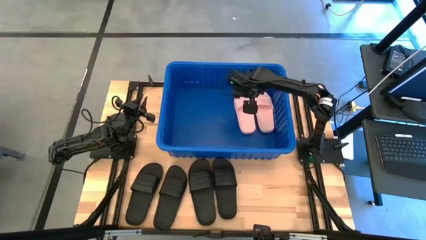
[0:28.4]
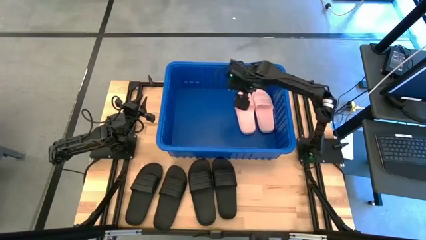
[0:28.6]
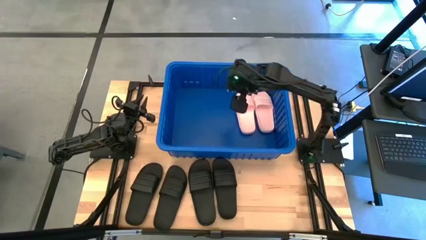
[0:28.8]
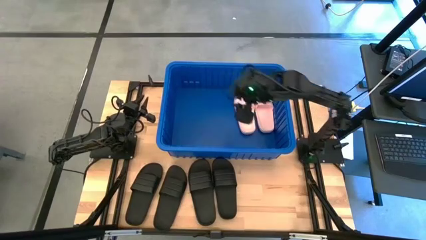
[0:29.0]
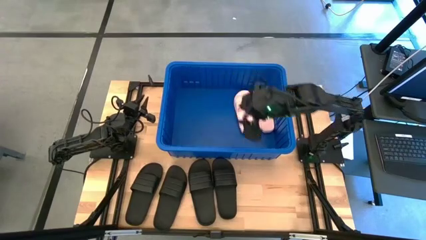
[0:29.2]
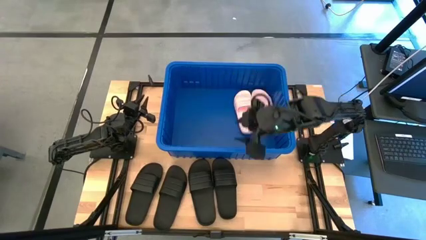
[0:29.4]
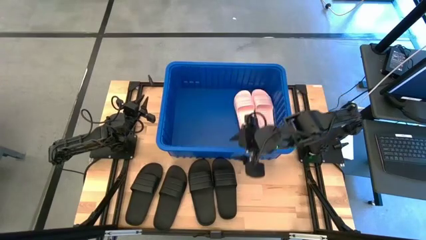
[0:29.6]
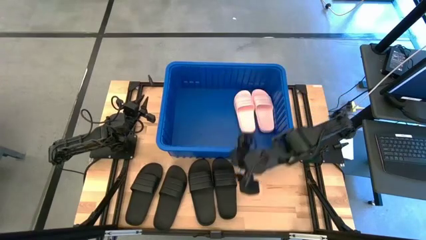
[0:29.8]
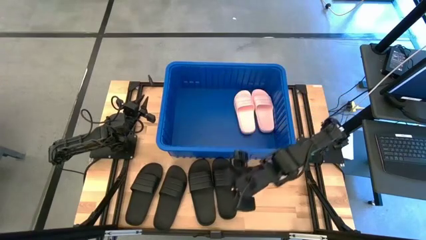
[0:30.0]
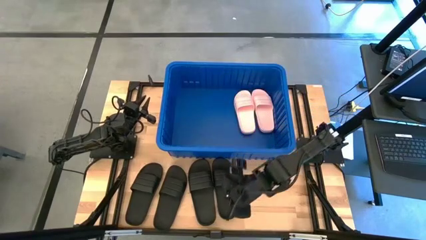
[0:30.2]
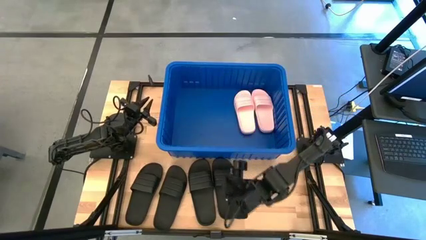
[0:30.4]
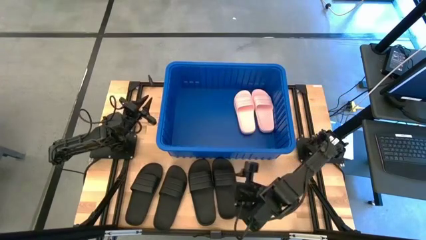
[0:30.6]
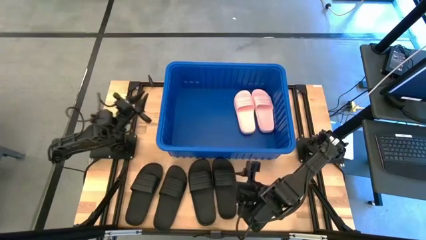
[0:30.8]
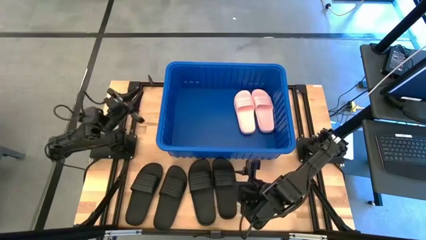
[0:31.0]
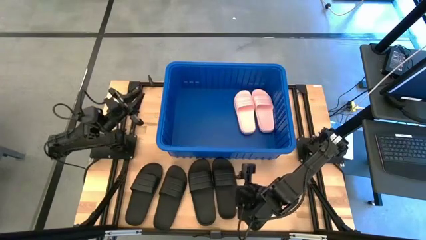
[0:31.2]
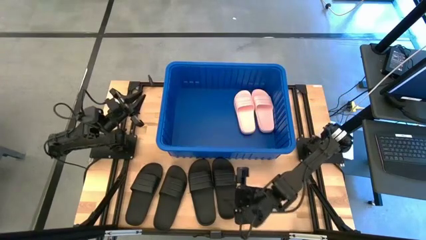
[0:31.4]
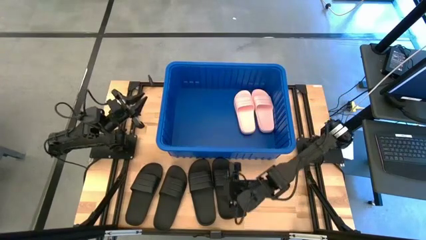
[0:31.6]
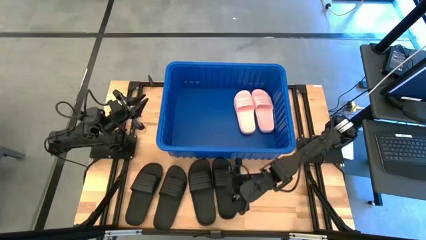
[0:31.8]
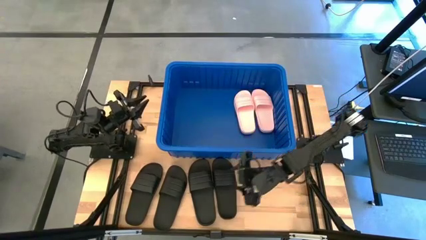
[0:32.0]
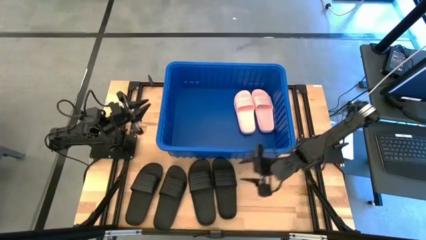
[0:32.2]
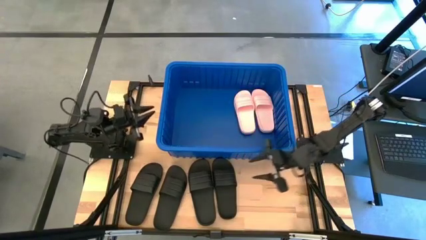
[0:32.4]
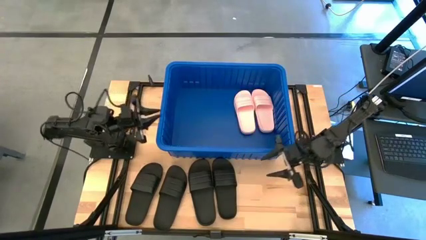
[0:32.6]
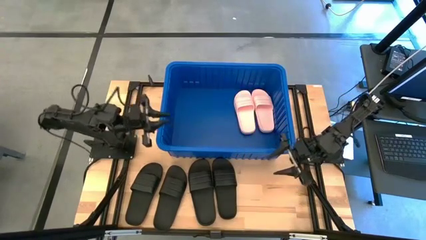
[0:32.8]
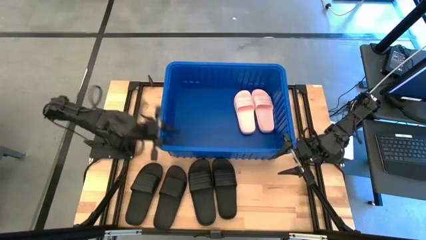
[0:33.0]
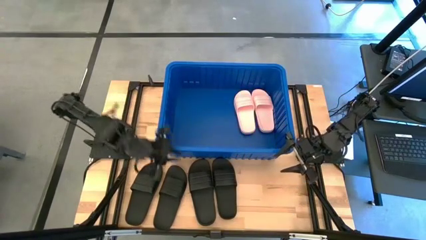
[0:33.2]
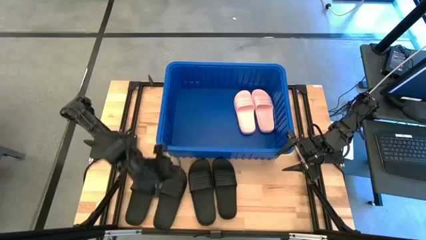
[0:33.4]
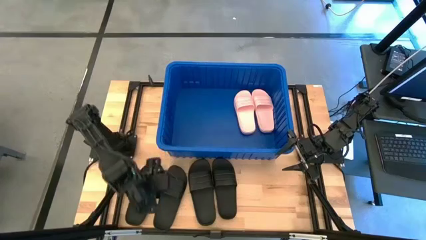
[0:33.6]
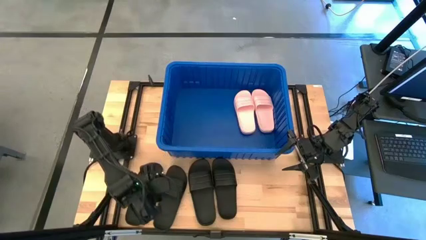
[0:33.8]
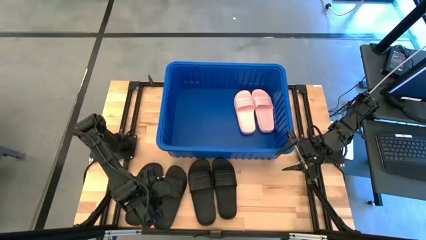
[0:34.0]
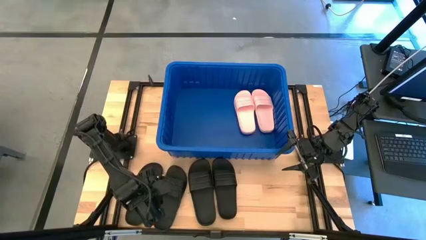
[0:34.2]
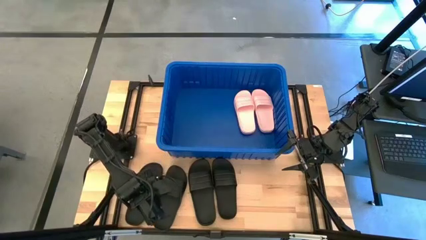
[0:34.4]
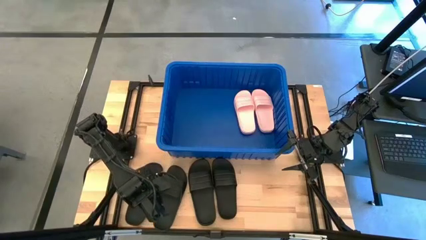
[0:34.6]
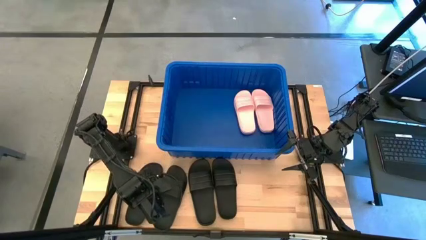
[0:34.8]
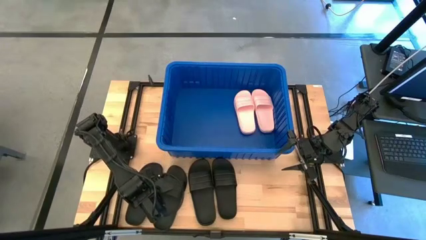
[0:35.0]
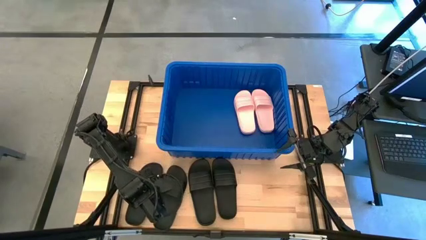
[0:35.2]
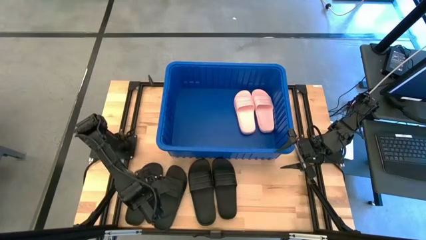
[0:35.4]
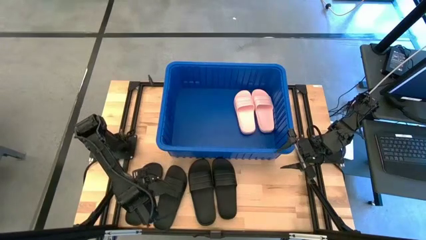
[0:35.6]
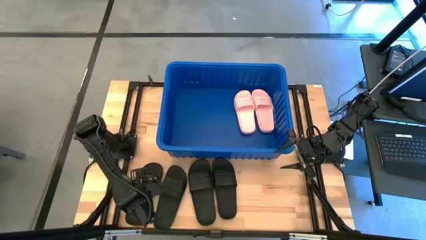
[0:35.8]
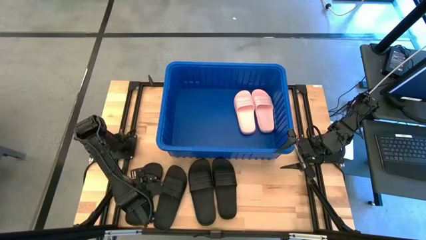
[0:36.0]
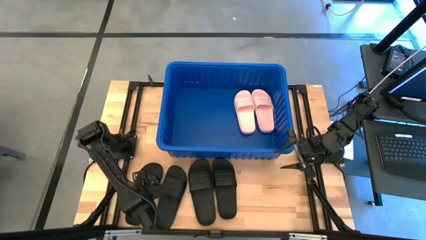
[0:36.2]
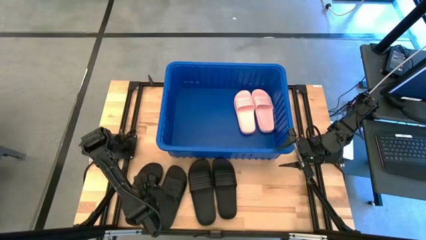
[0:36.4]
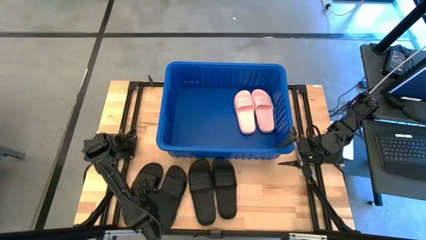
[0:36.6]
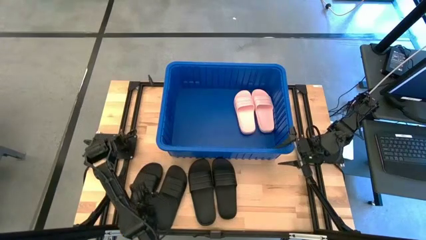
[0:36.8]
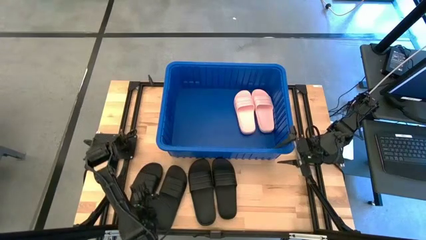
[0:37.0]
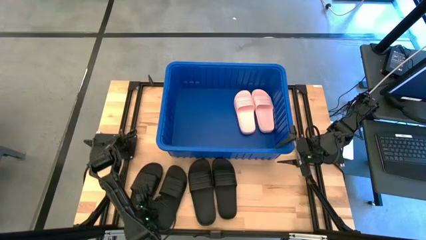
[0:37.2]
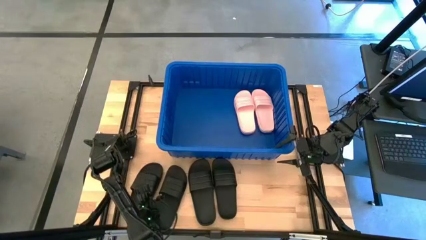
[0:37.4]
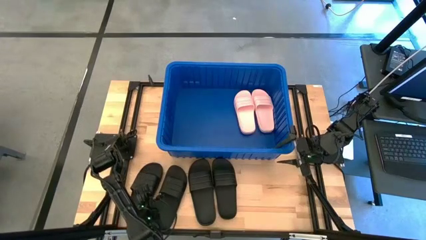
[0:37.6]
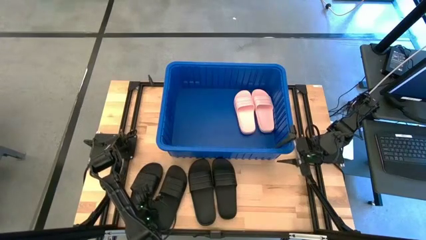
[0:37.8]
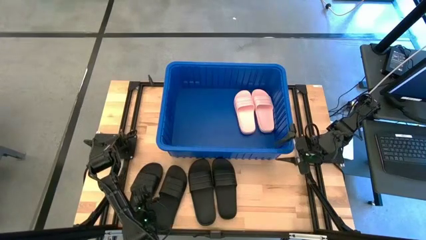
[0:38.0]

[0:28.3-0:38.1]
Task: Pick and place slides into bin
Put the black slipper into the blue bin

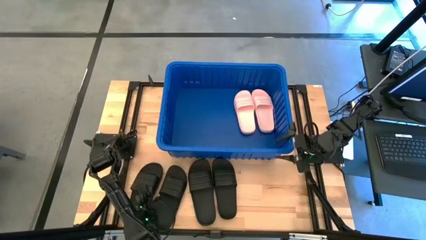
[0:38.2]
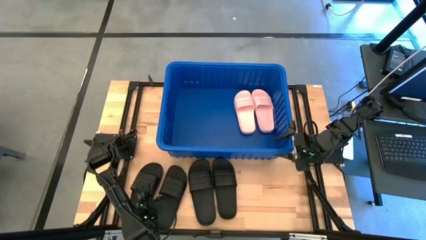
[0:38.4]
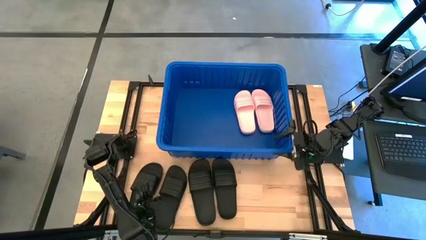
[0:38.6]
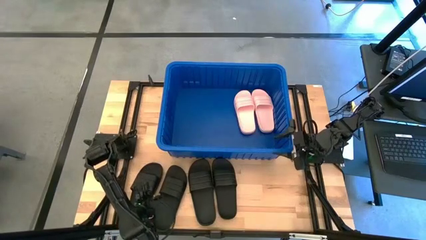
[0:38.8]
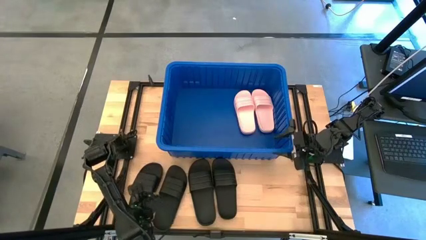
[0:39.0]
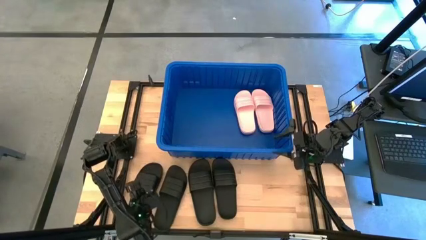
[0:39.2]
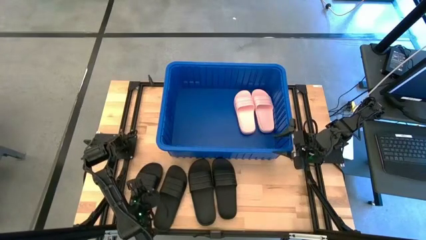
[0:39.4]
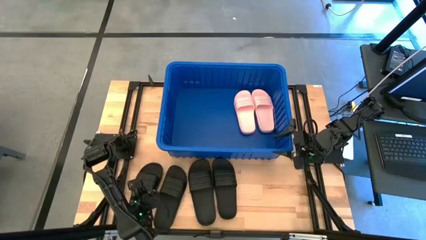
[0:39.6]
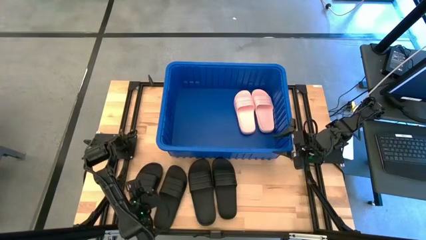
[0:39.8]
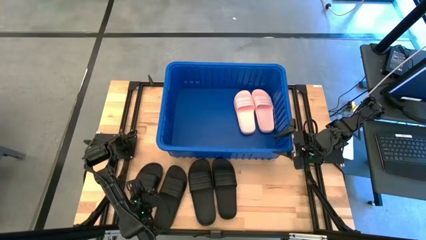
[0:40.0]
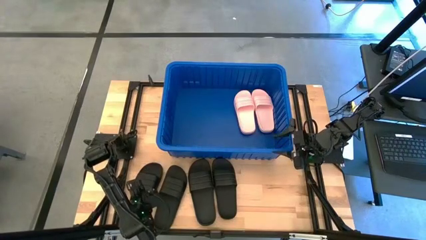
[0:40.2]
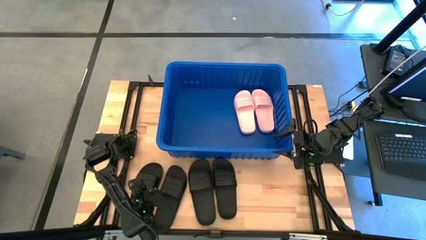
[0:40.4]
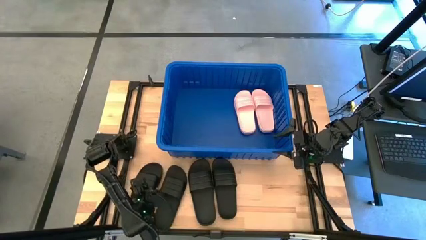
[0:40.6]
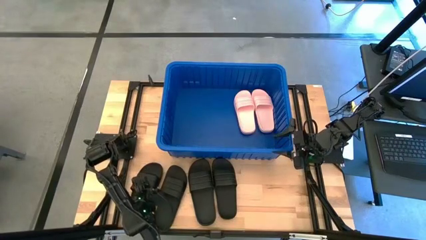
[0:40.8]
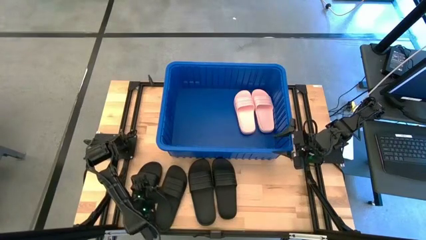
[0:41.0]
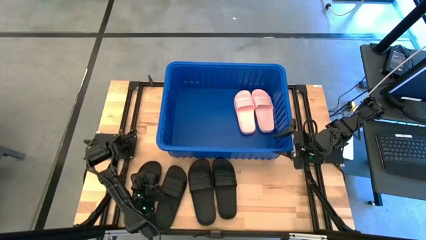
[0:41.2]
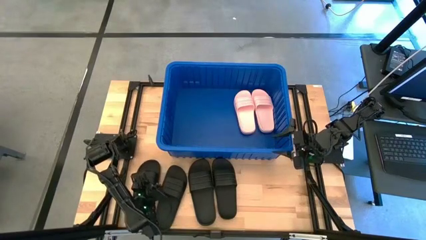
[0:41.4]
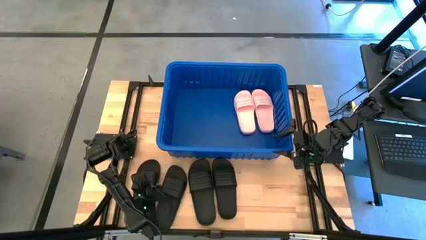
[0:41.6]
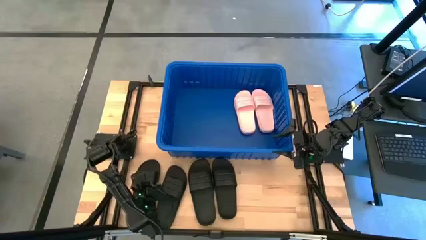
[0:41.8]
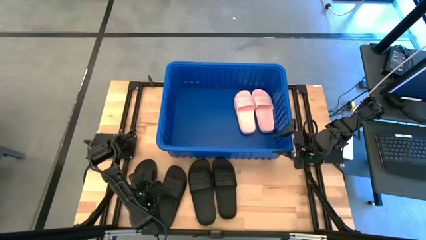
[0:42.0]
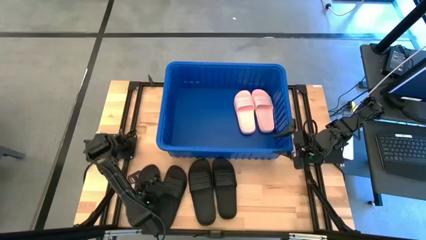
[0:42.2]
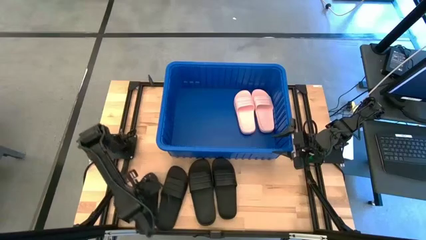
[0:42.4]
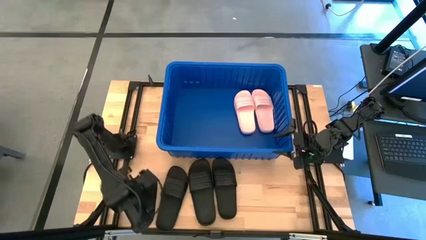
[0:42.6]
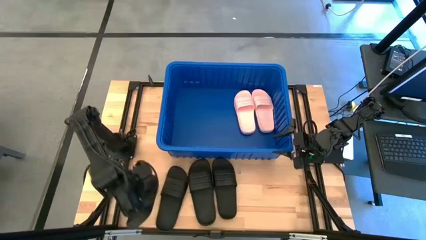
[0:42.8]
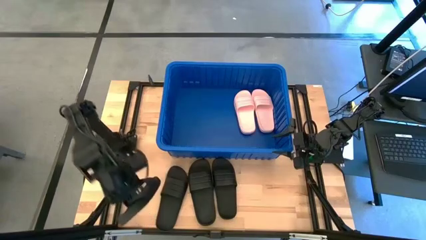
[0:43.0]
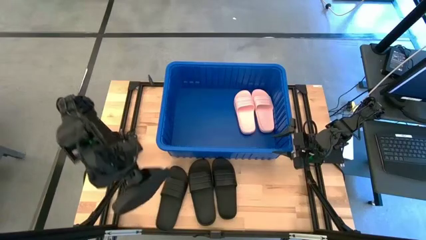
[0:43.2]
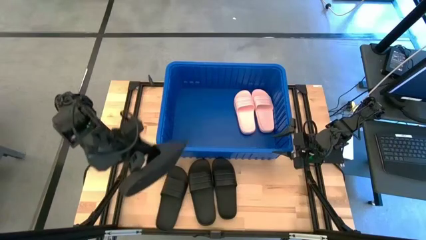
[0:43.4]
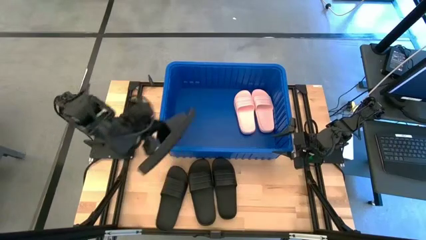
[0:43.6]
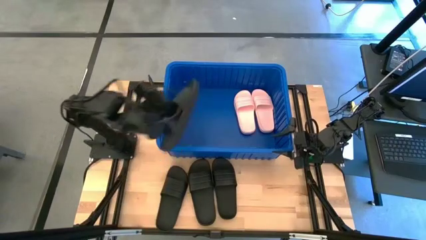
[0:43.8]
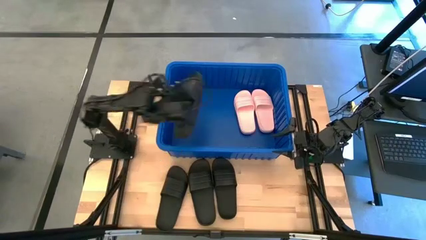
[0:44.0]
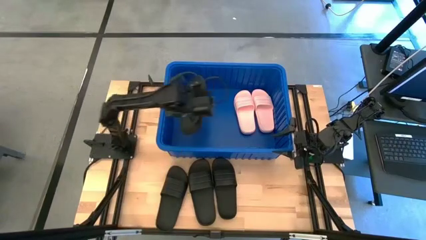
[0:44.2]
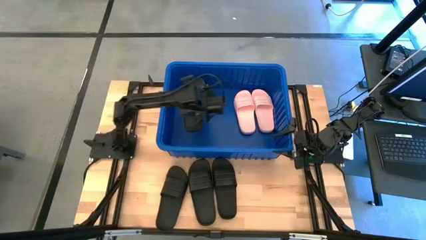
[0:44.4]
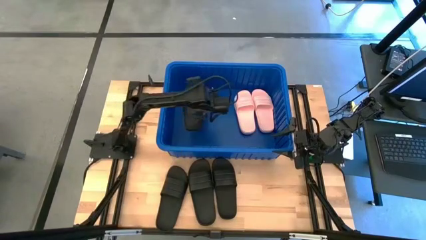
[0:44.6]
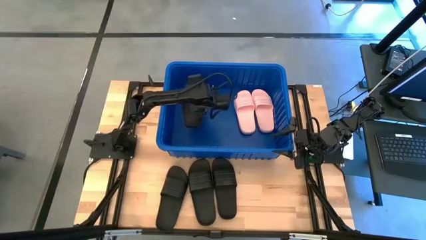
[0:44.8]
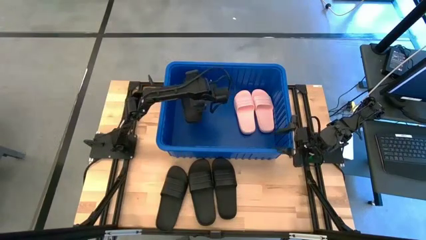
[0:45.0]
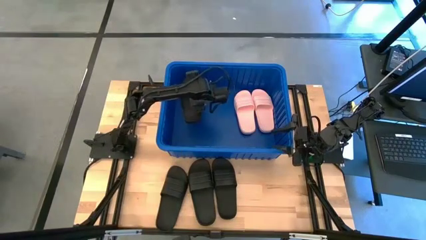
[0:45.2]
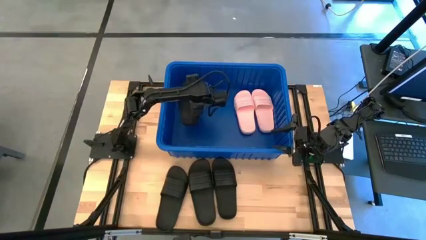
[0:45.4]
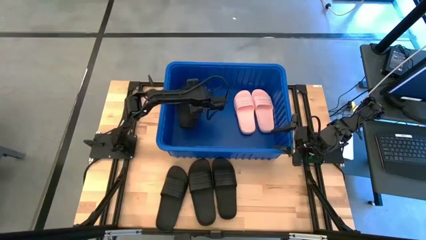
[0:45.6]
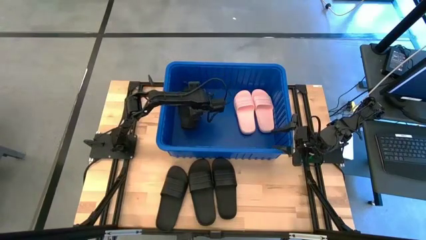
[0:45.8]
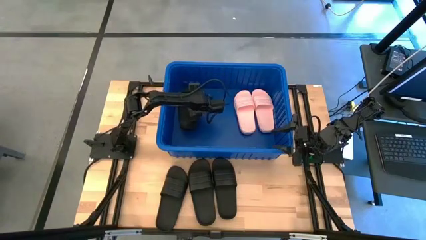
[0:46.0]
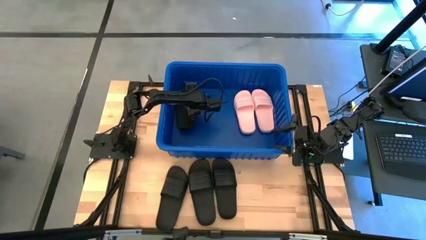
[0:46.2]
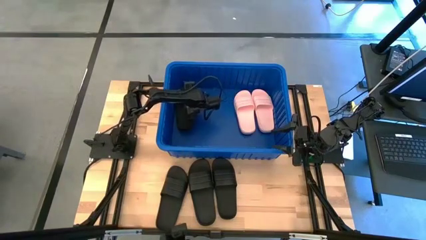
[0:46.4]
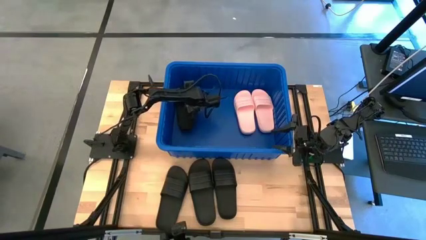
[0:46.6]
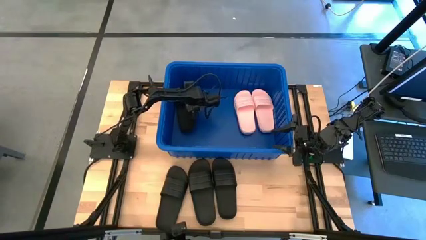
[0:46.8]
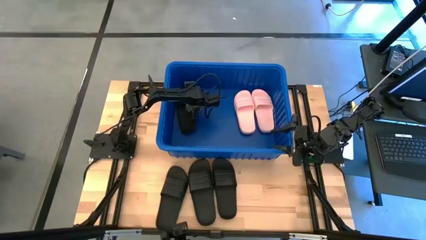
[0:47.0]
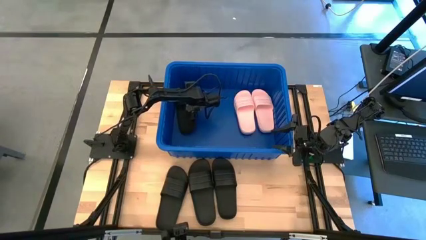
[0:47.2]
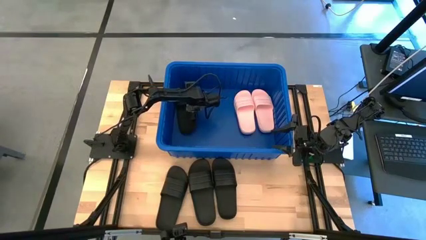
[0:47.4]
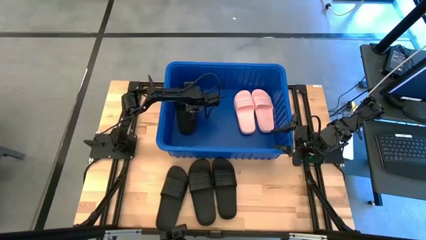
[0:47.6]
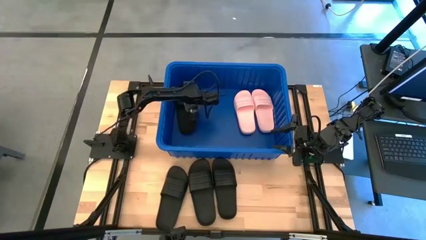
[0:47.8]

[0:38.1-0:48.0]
Put the black slipper into the blue bin
